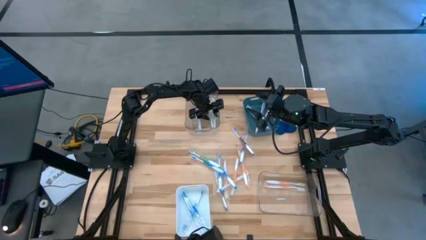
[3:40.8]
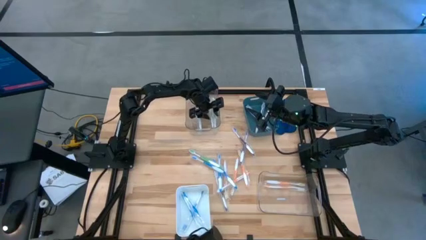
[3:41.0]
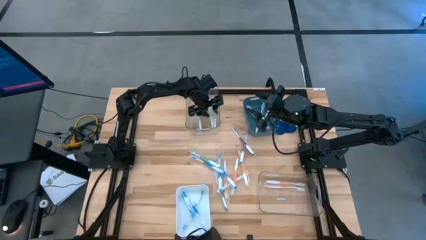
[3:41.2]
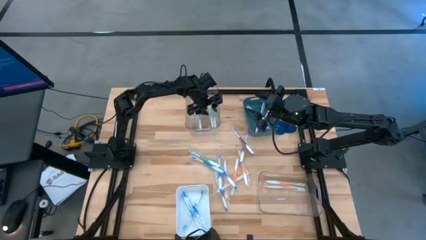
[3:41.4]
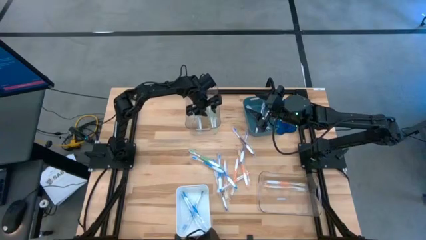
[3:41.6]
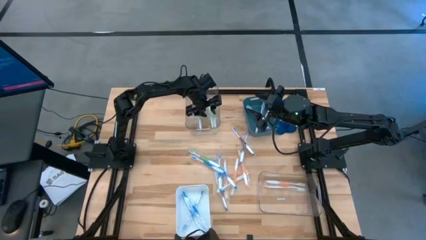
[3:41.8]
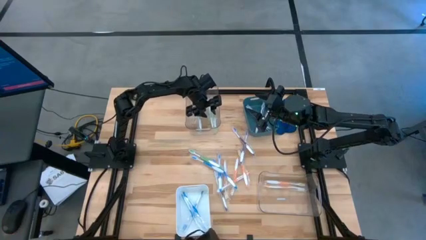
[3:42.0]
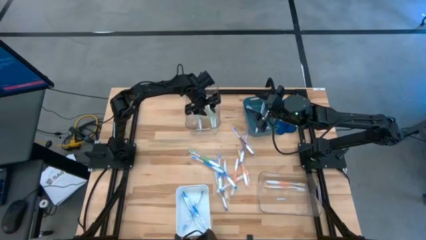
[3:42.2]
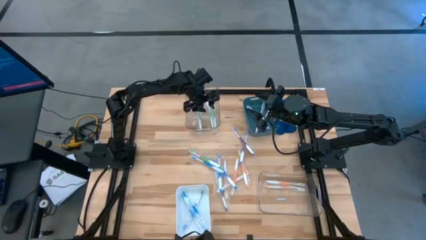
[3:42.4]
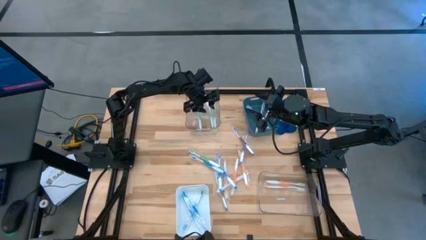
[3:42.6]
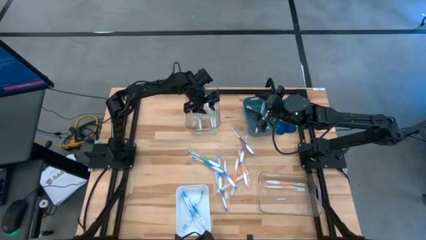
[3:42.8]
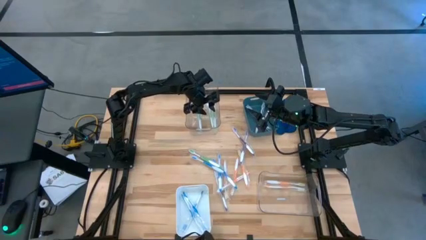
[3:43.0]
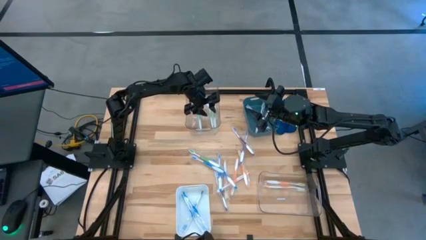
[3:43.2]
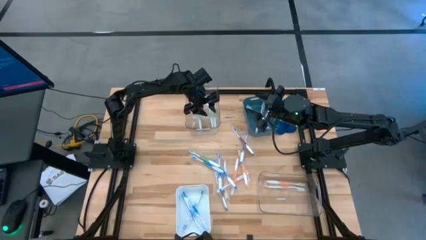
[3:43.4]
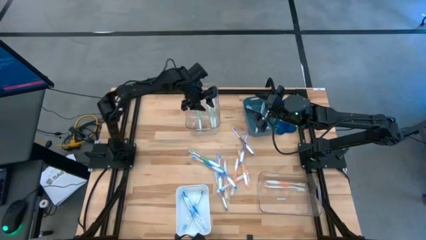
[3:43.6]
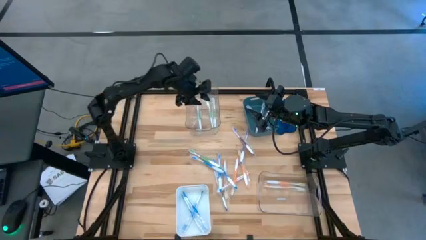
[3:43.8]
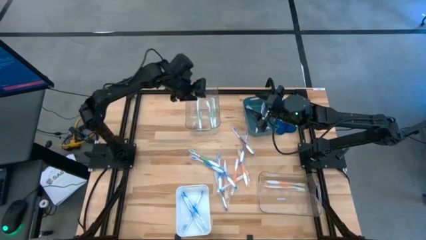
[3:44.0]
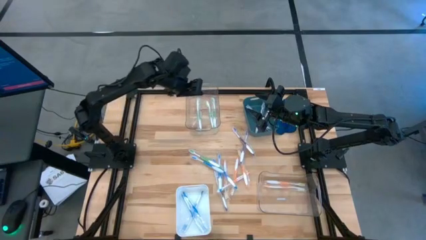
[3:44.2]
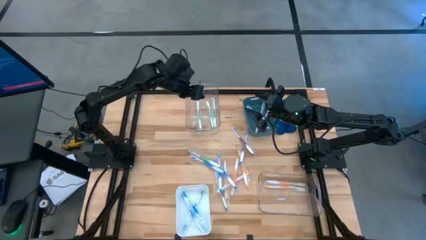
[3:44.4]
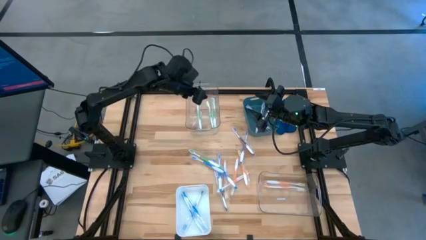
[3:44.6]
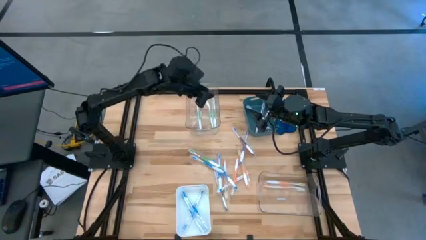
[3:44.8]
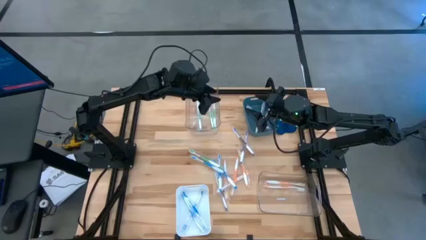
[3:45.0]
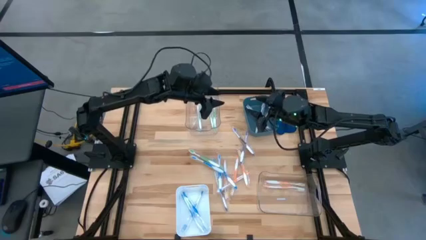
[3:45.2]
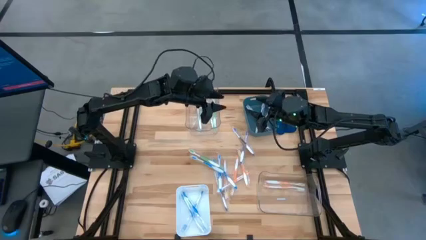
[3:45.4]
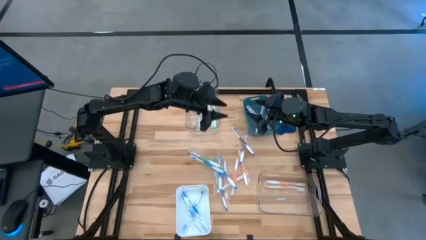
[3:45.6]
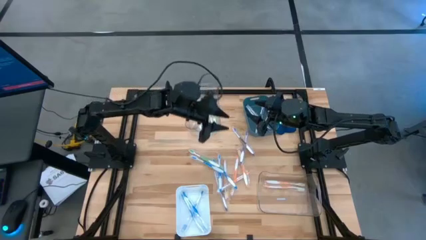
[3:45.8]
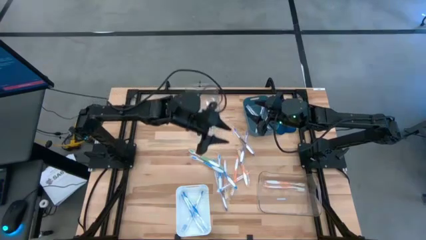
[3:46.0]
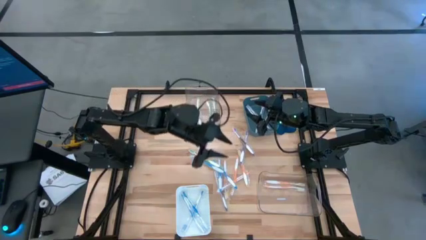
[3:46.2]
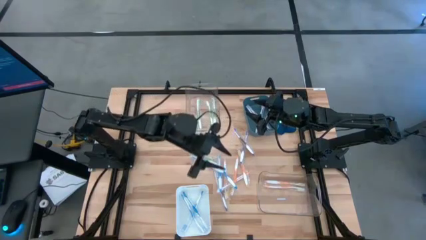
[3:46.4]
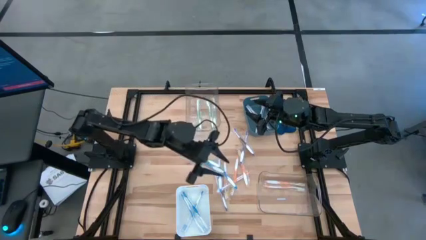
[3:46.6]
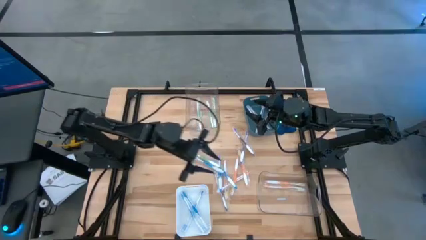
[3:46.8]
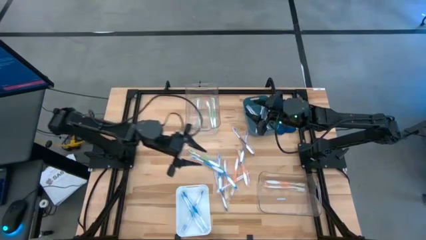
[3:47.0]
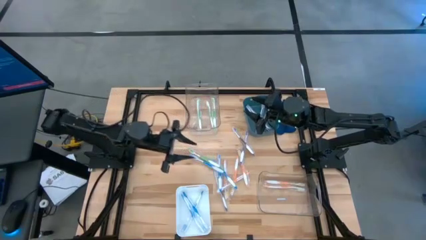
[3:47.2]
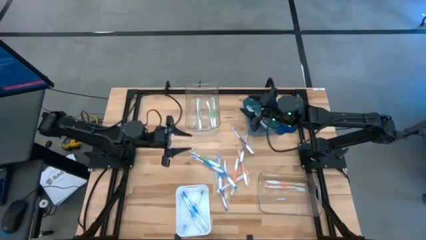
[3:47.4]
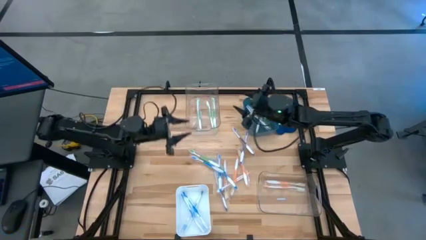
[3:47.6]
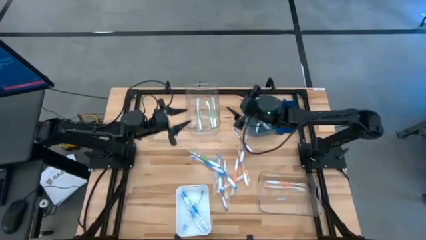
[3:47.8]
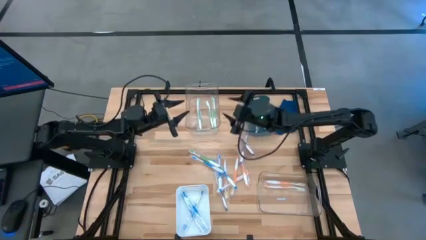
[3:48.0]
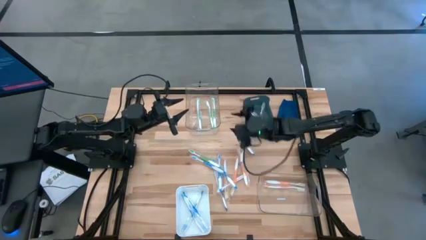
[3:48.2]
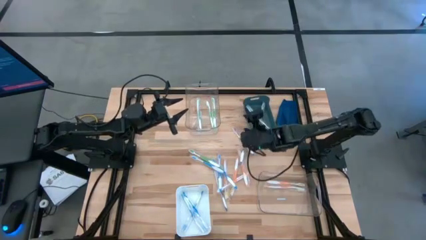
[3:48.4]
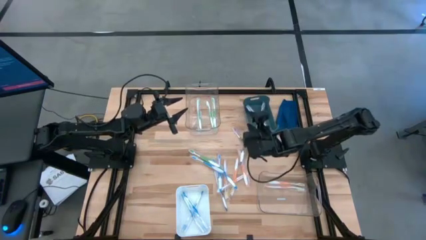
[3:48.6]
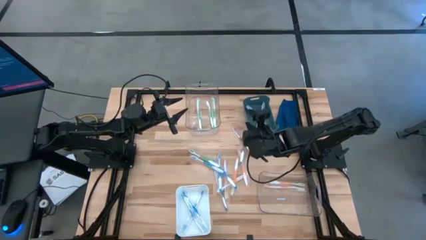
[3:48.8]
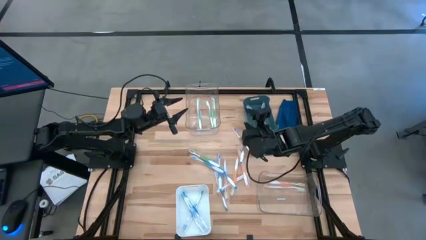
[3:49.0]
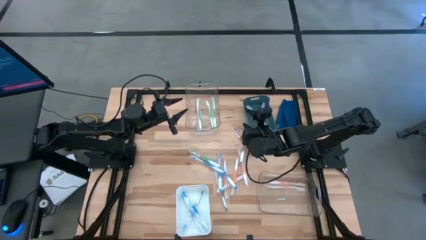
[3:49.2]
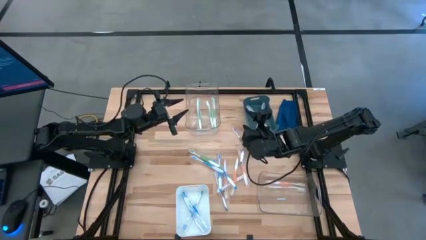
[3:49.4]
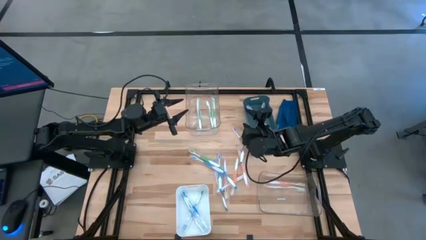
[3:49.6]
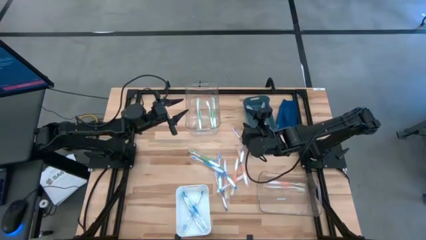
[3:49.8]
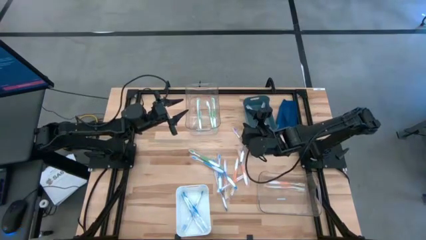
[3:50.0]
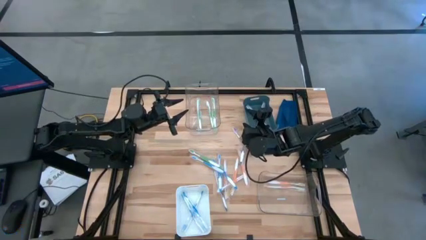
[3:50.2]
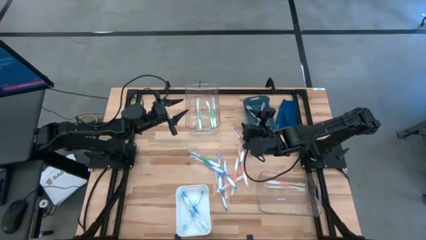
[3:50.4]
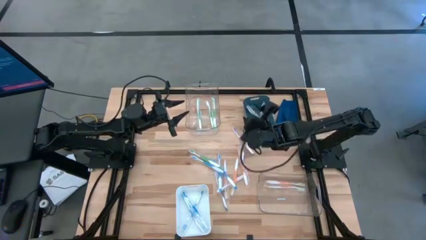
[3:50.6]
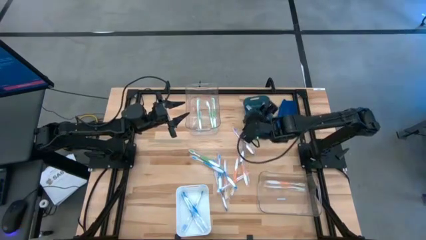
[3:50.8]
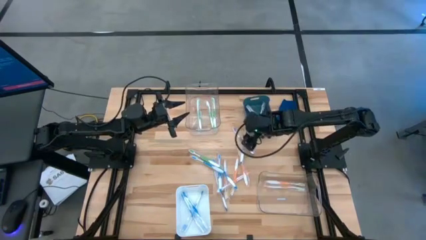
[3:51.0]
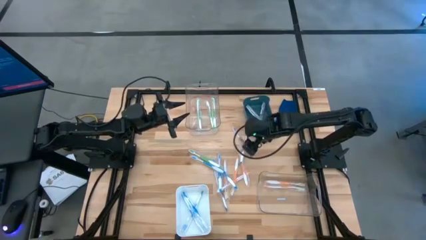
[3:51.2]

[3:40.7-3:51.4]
Task: Pick & Place Toothbrushes
Put the purple toothbrush into the green bin

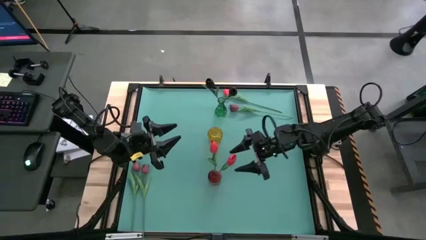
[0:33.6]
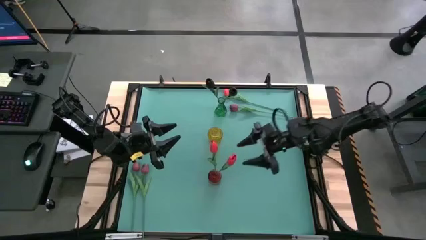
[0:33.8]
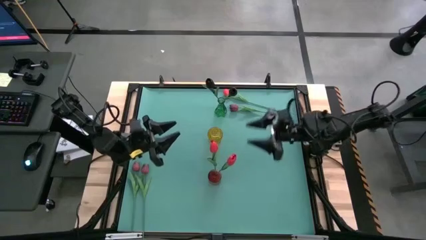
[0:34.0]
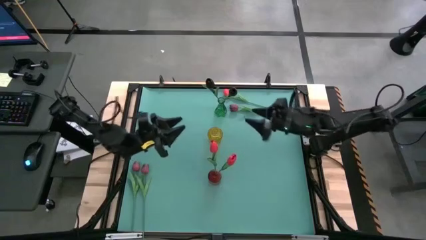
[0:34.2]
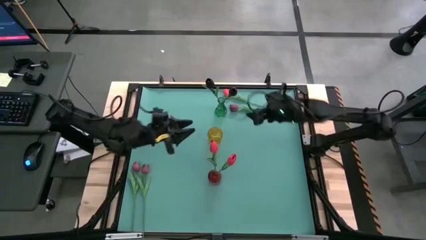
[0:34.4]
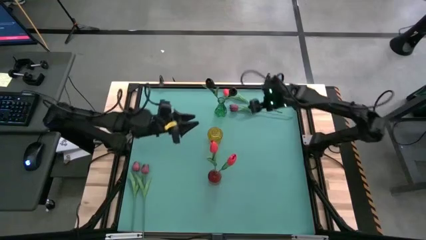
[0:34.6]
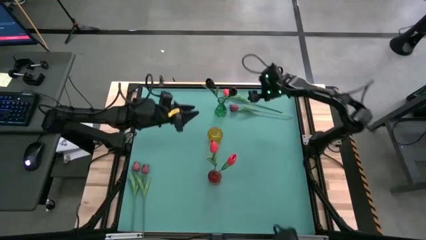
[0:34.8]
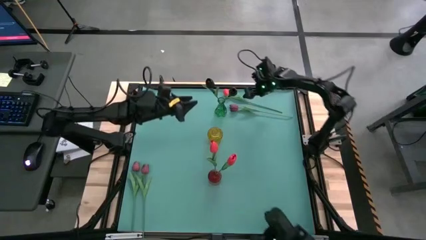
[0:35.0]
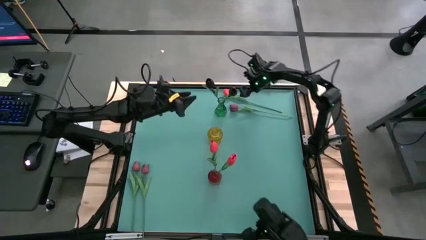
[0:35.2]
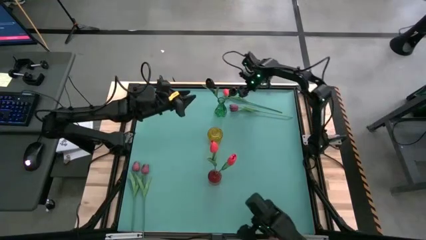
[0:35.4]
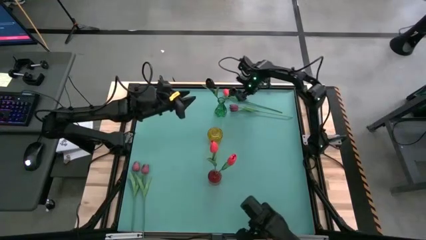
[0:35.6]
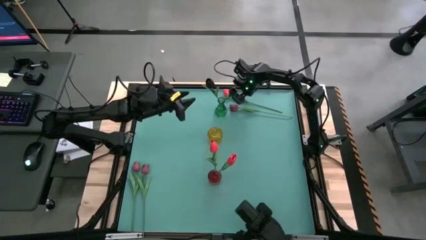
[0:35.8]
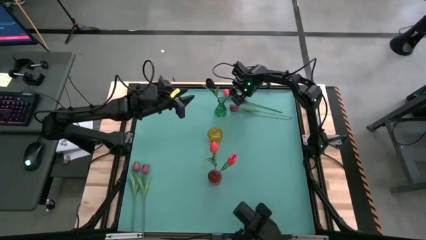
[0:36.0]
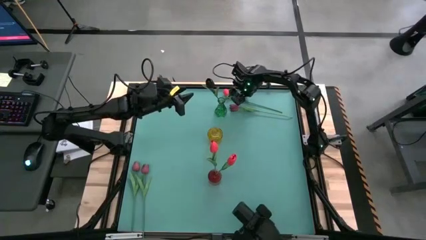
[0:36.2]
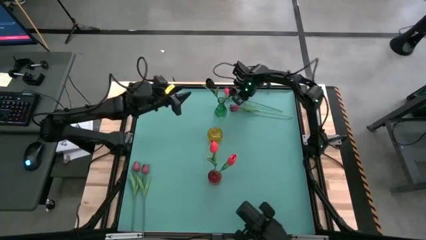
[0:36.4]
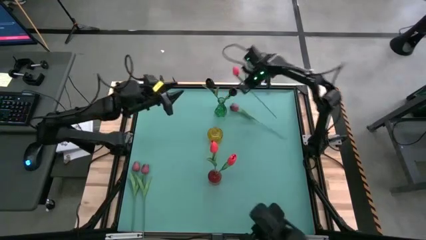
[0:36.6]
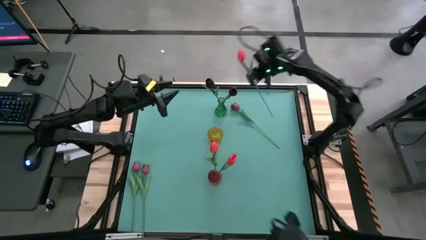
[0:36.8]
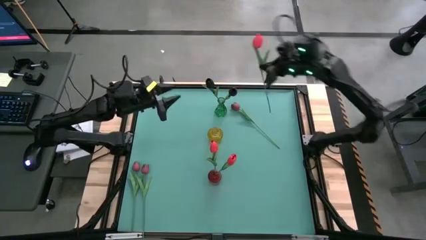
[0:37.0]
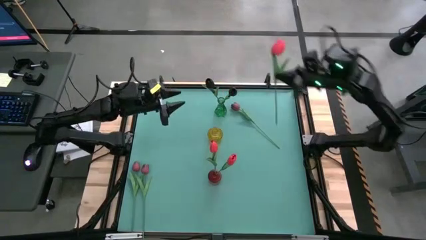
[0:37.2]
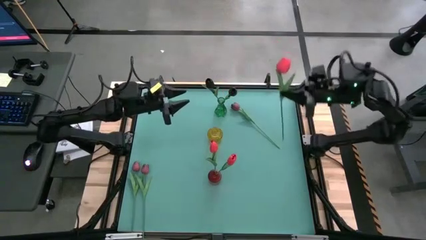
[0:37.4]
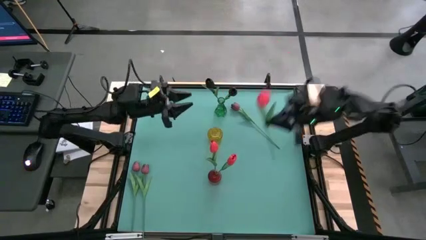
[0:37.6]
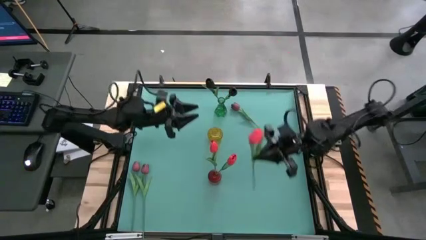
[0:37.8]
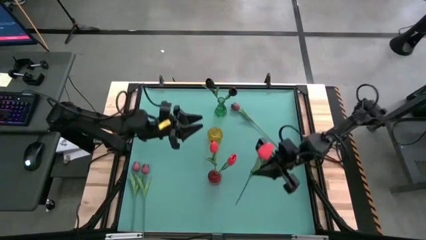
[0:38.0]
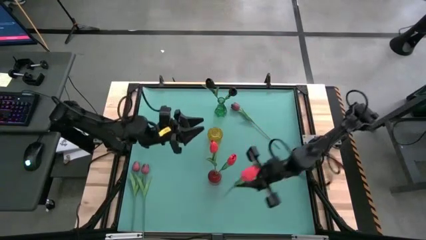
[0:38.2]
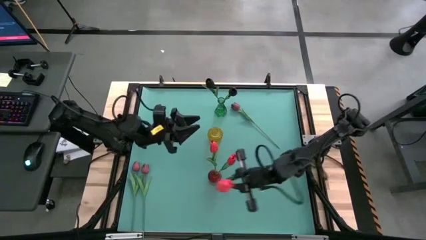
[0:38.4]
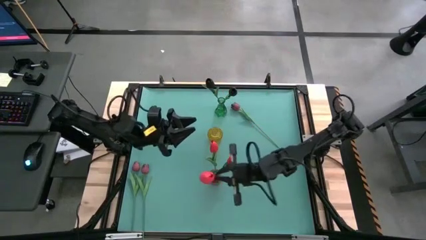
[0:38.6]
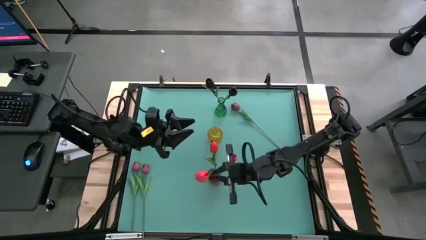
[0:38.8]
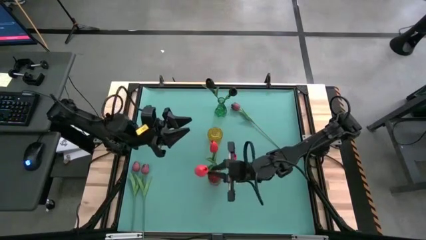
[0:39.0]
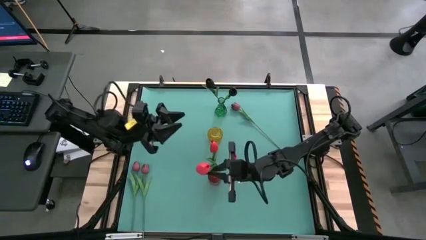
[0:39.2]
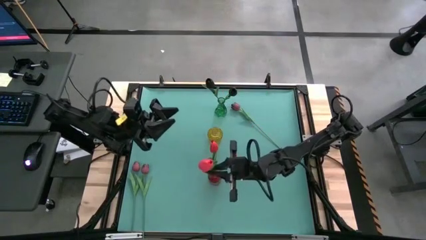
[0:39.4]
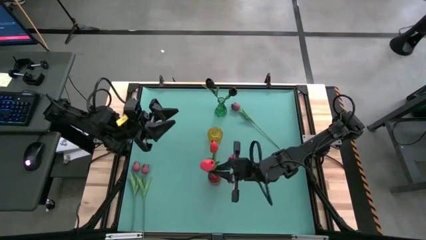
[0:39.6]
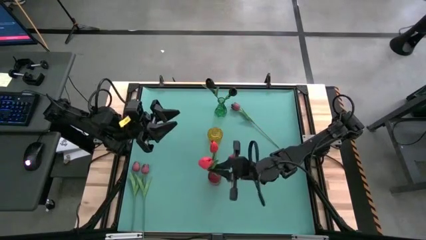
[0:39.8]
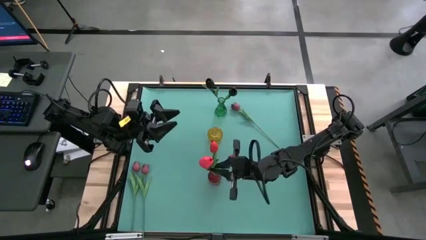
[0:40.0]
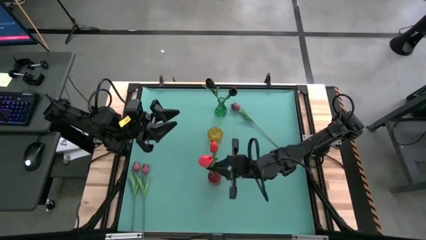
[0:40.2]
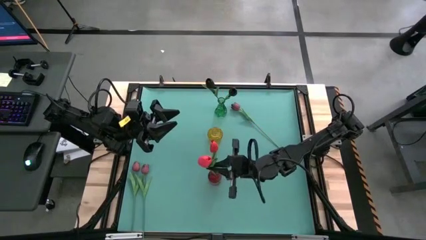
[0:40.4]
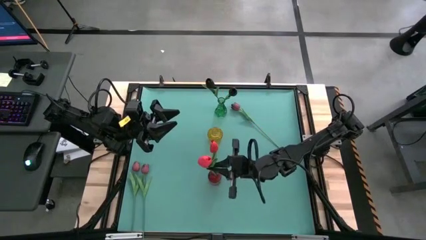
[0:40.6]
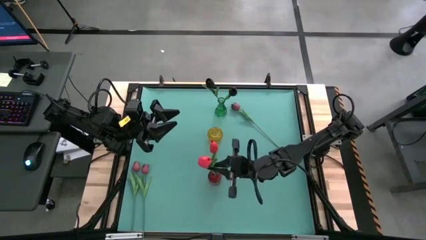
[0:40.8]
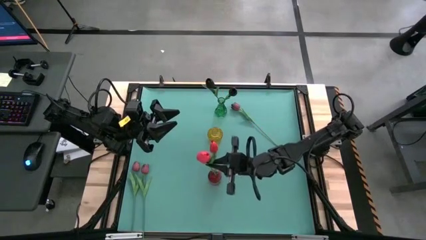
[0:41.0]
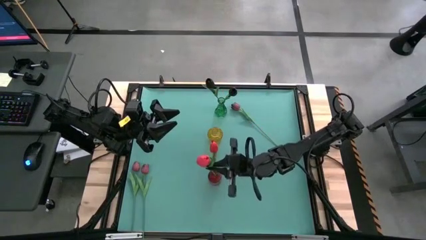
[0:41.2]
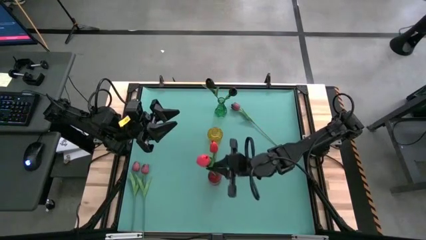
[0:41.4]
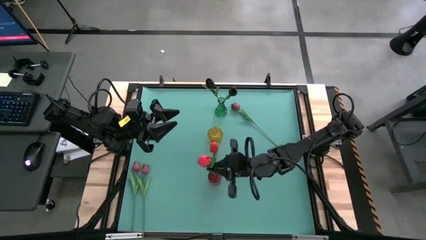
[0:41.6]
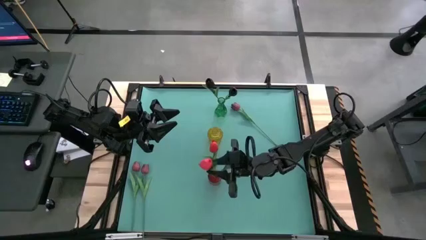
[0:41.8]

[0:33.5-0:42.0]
Task: Sort flowers into vase by color
Put the pink flower into the red flower vase
